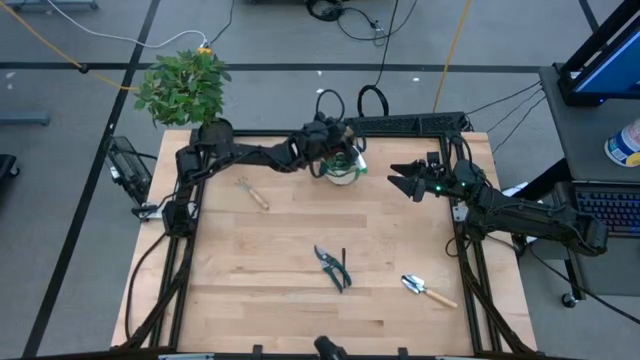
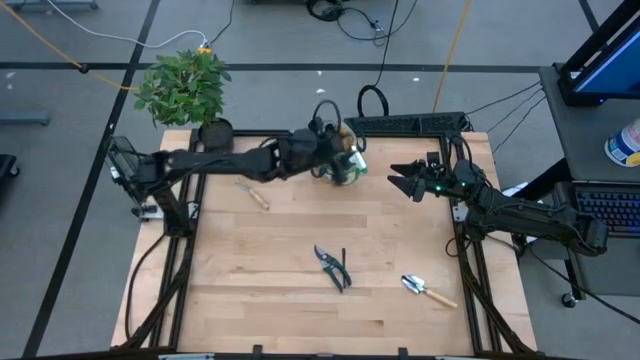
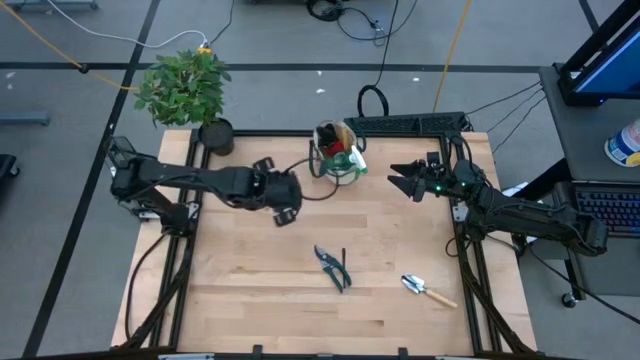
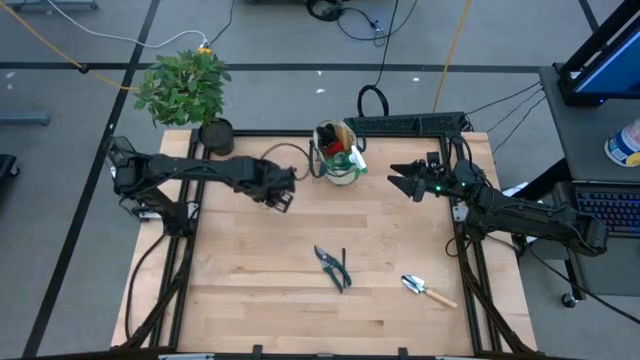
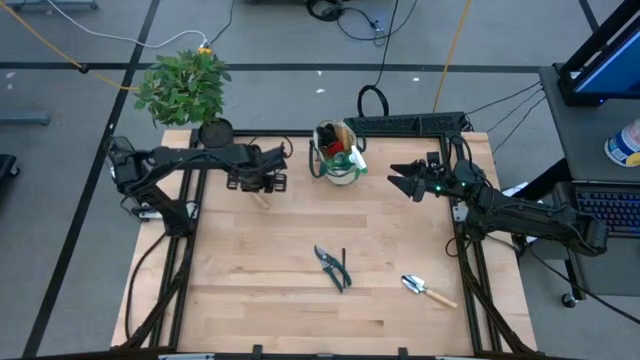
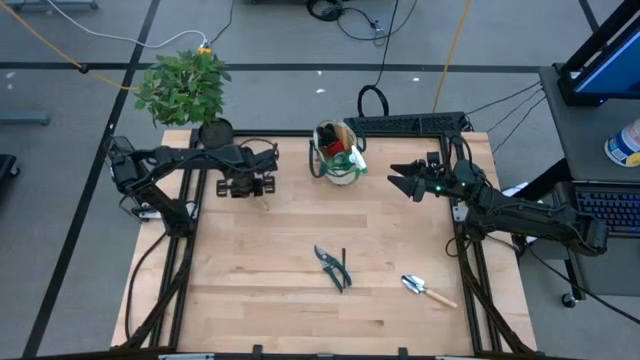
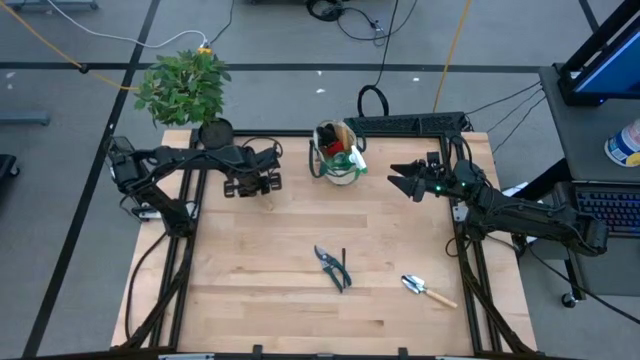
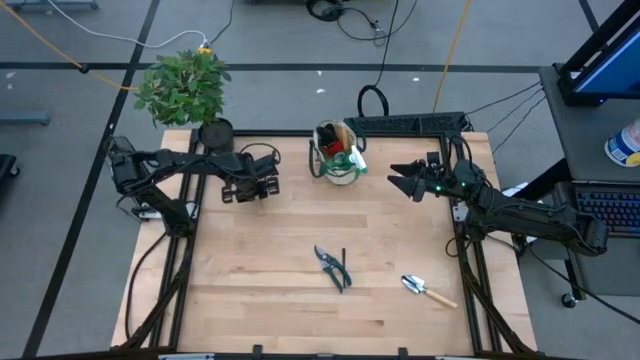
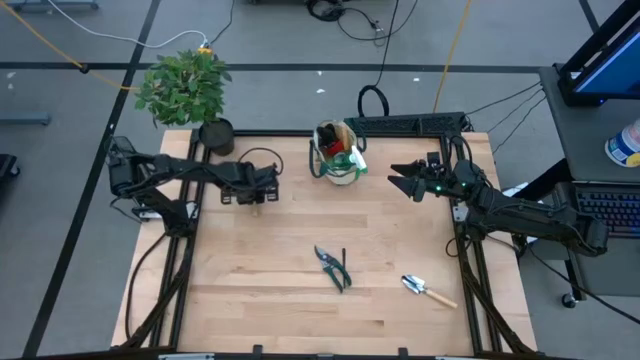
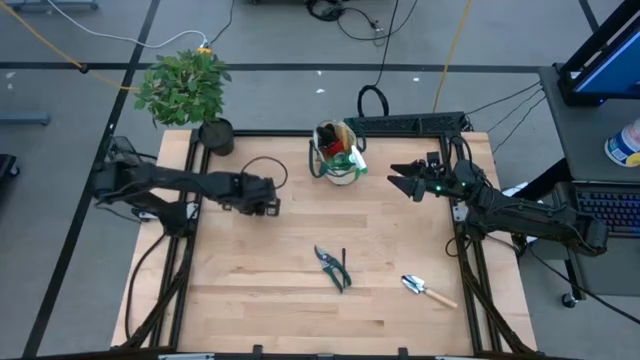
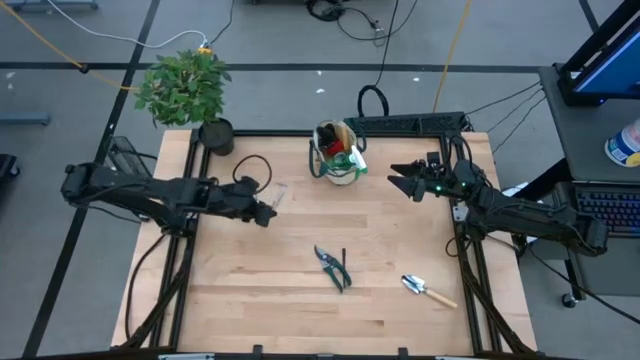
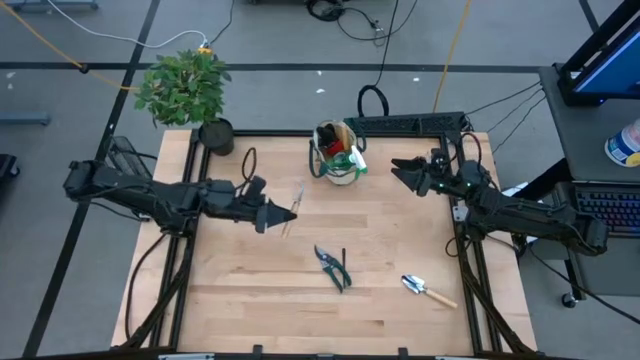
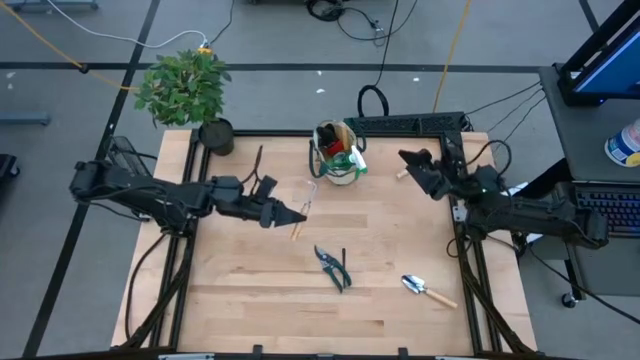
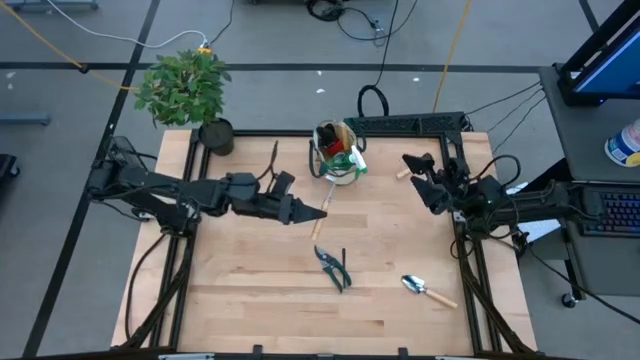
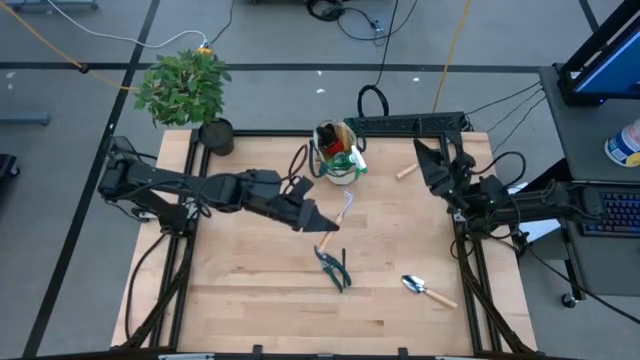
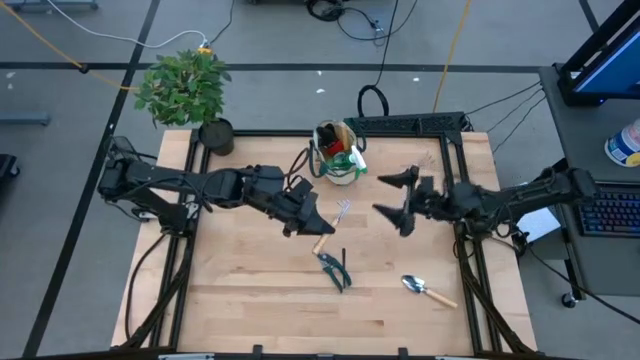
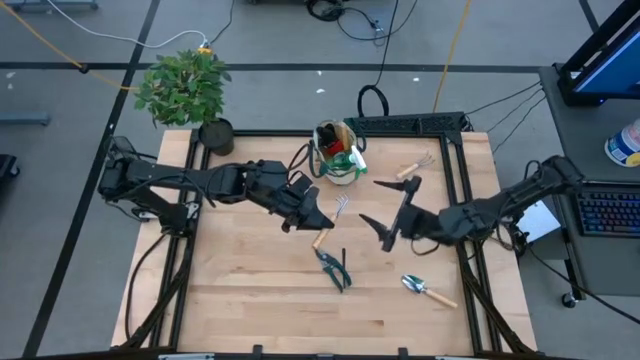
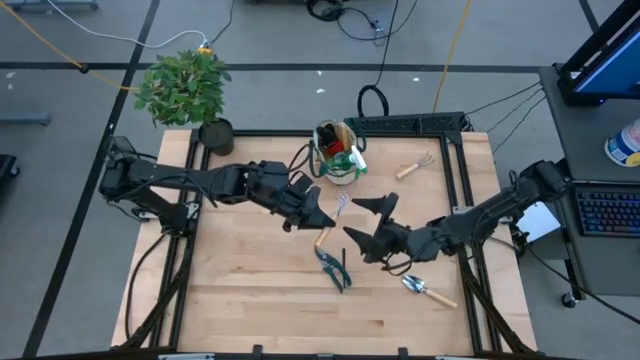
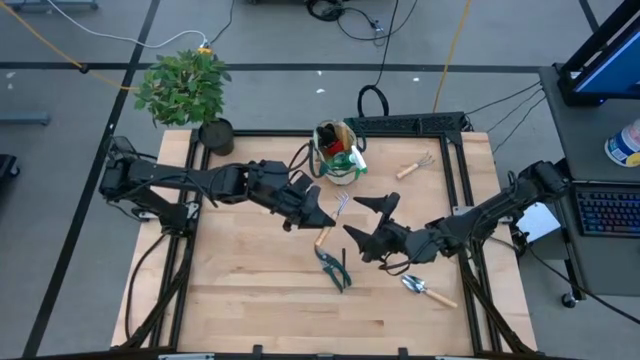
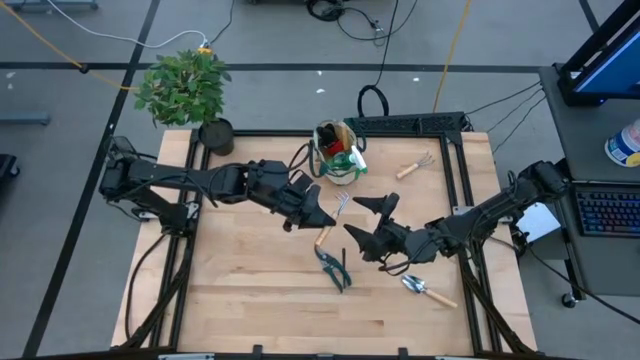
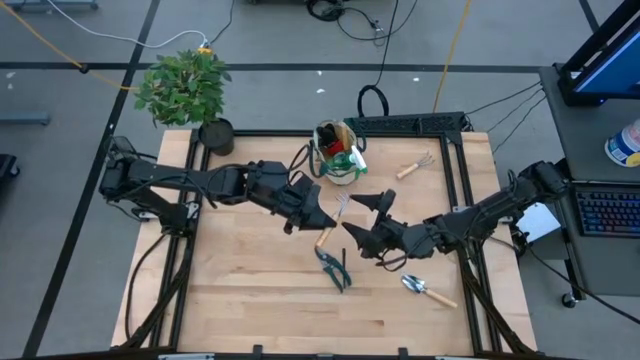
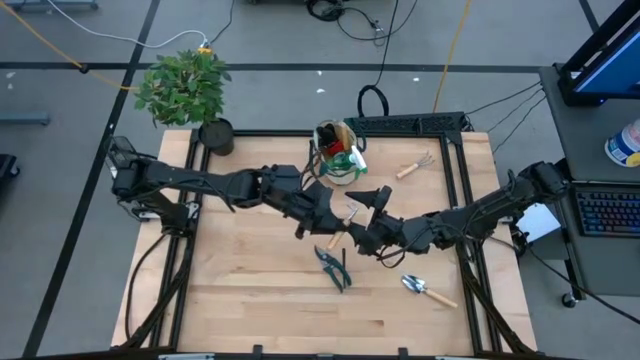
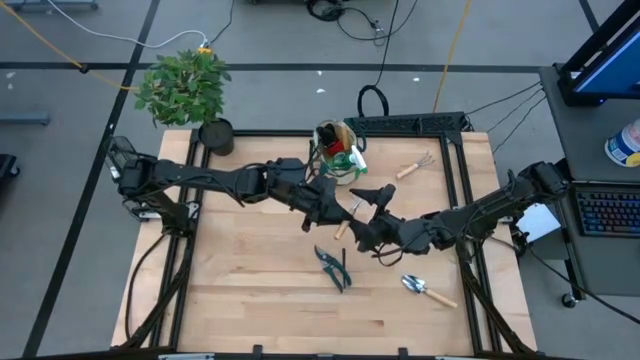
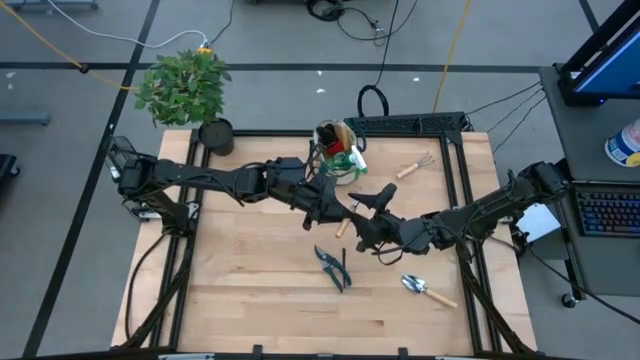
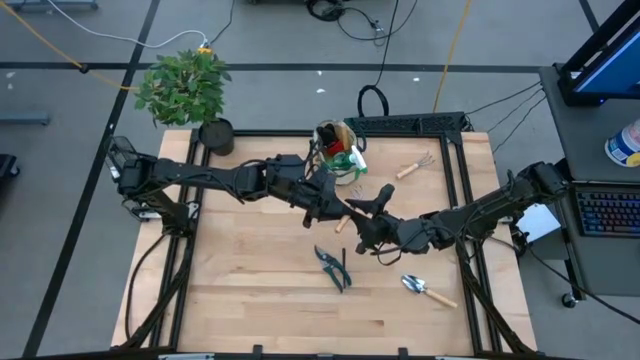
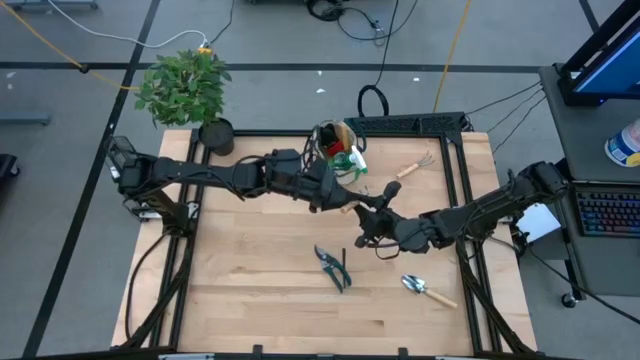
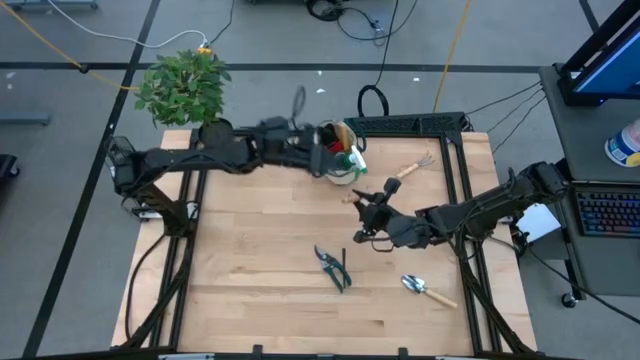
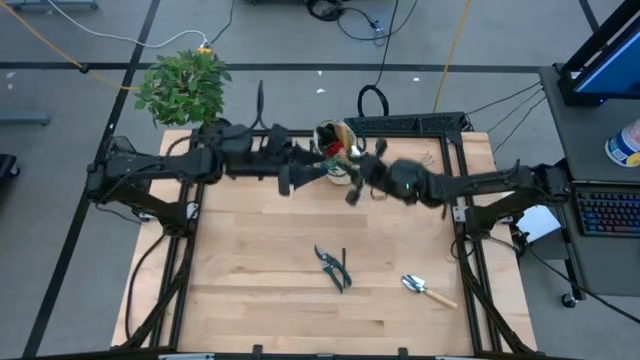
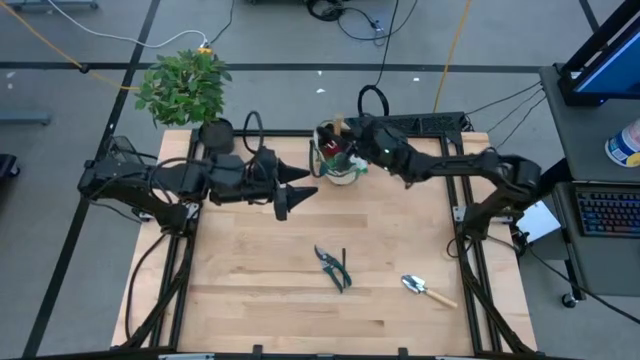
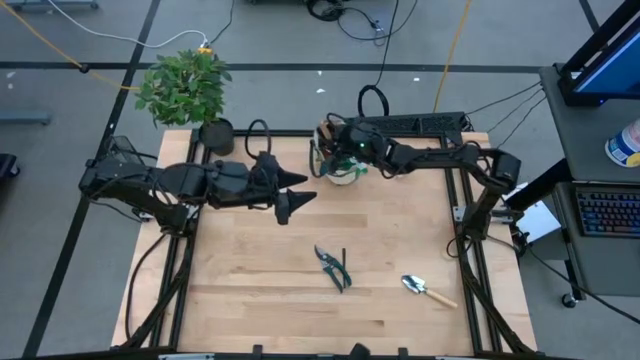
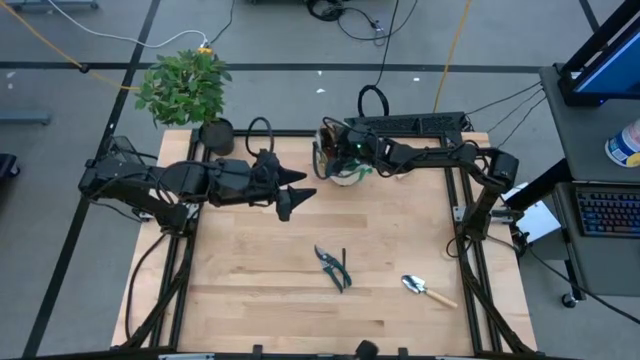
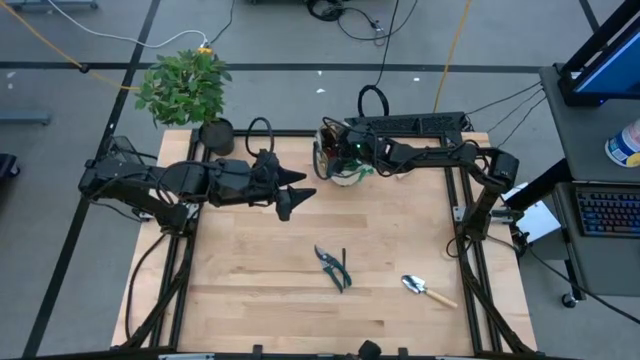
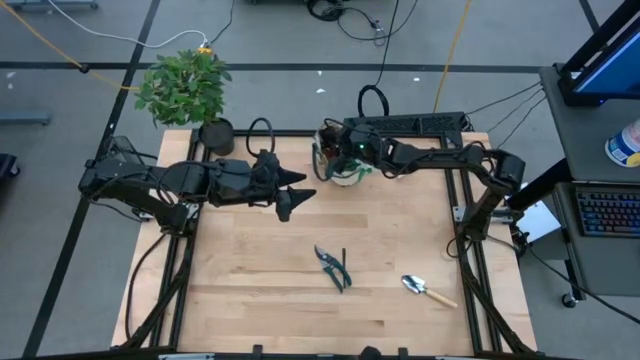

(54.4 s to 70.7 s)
Task: Pick & Place Garden tools in Gardening bag
Put the left hand rake into the gardening bag
